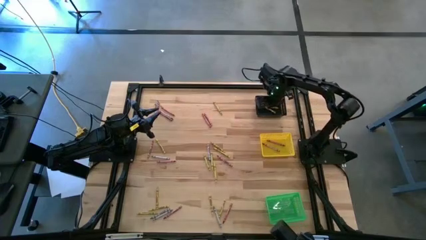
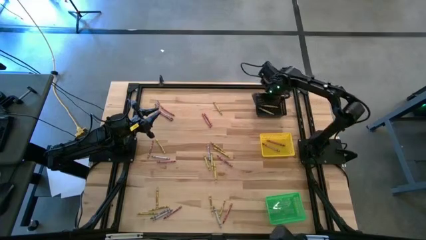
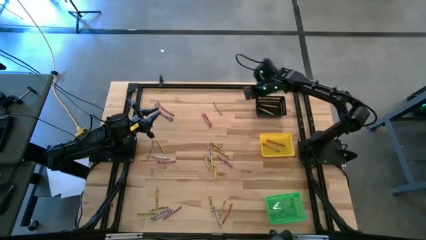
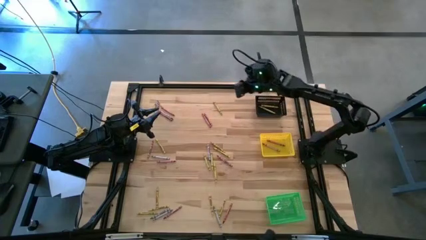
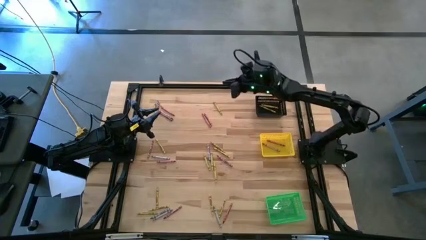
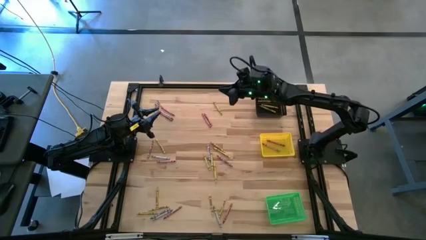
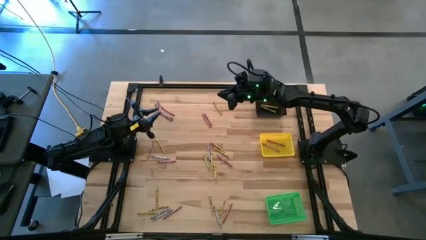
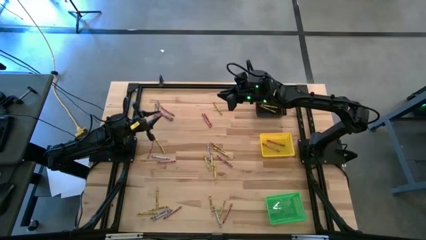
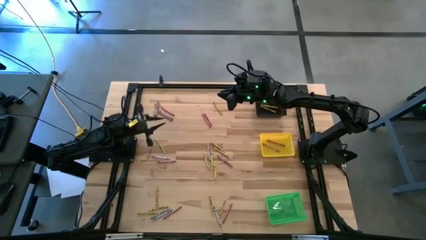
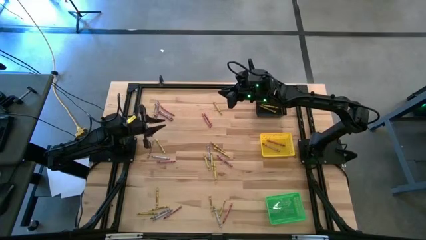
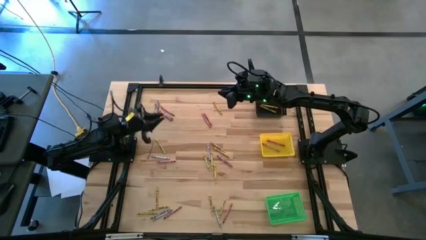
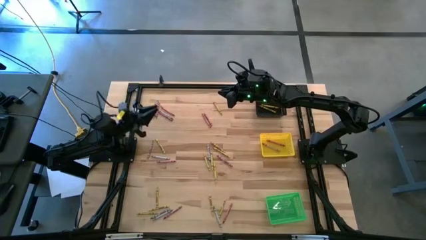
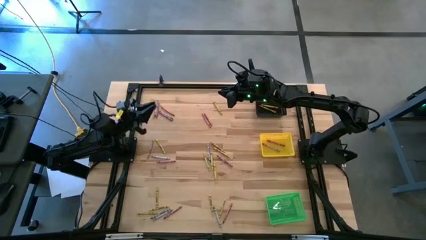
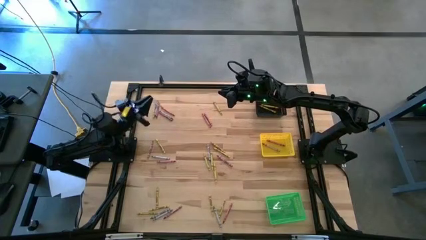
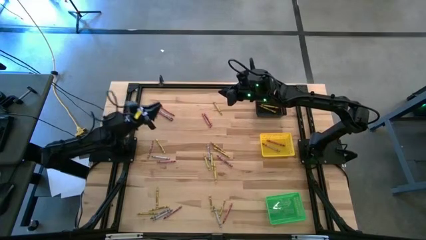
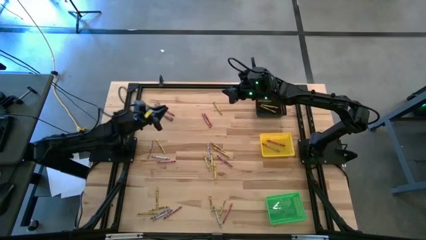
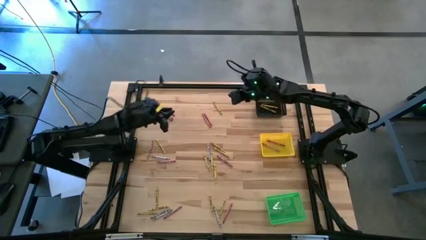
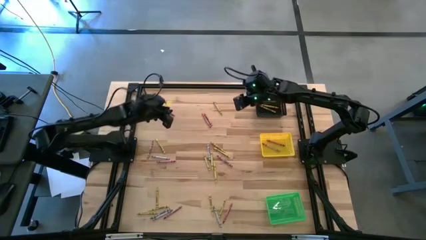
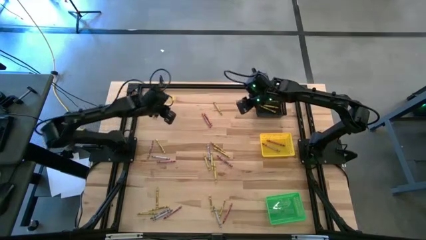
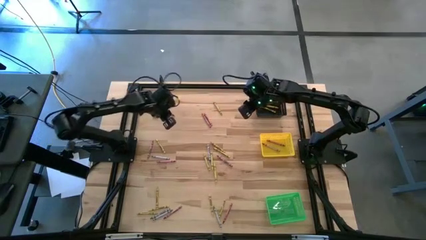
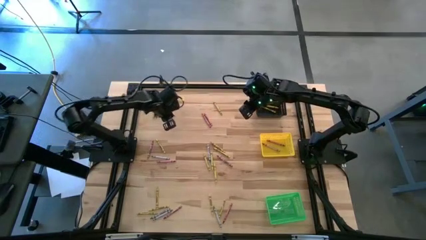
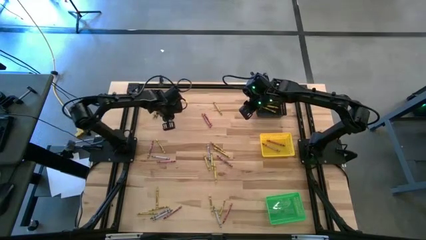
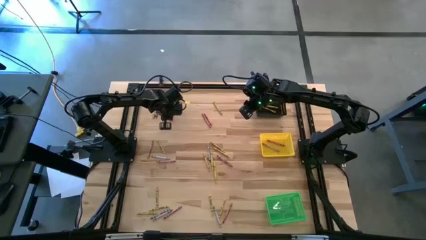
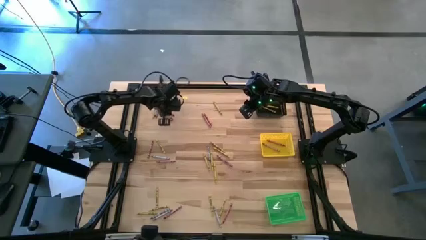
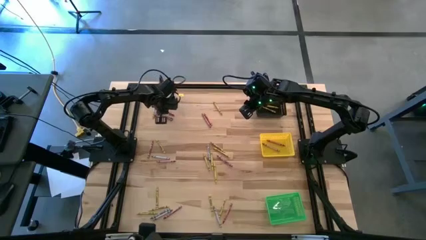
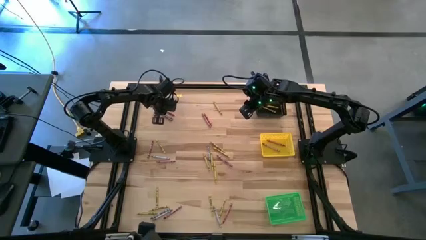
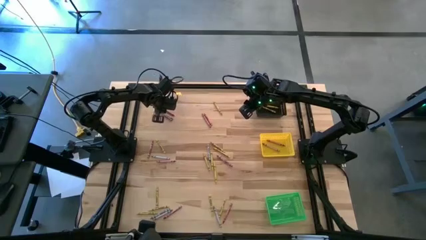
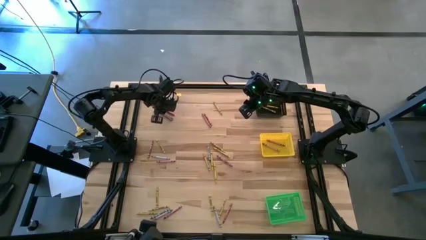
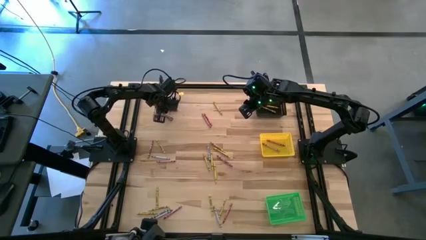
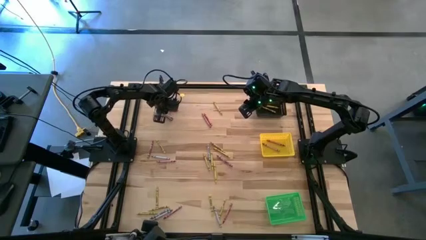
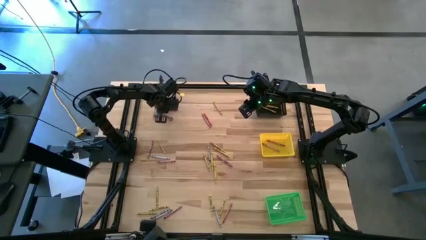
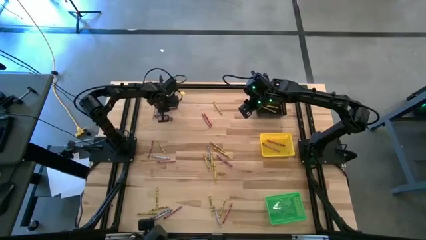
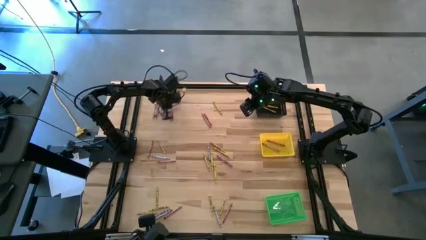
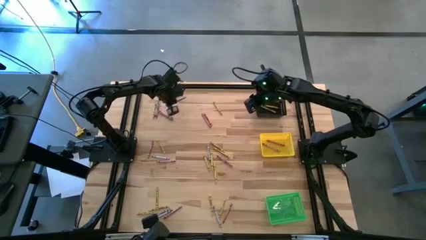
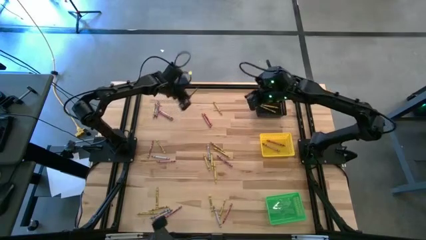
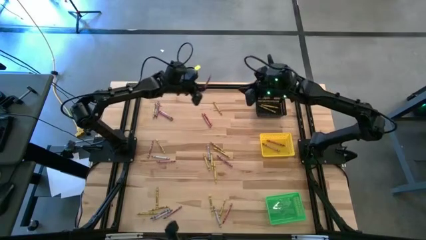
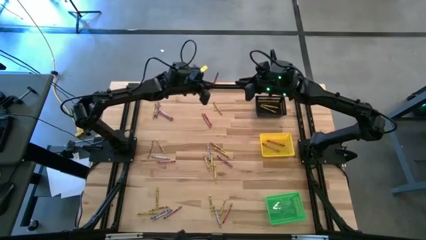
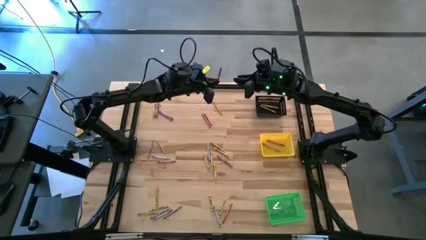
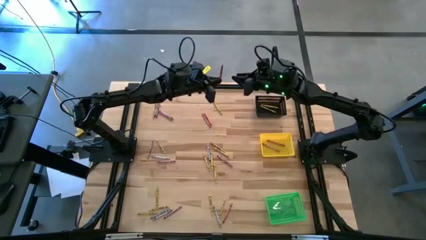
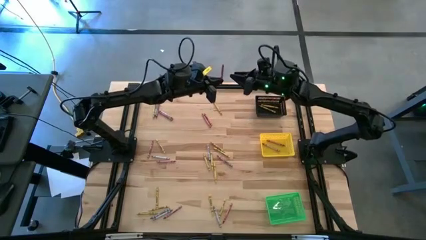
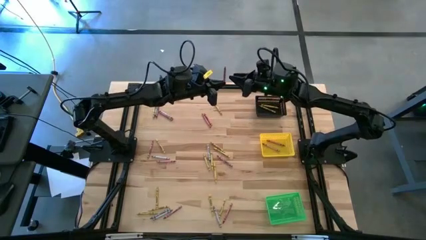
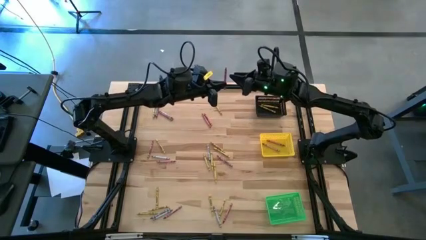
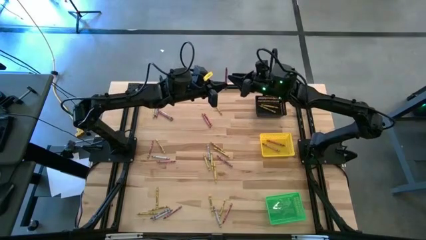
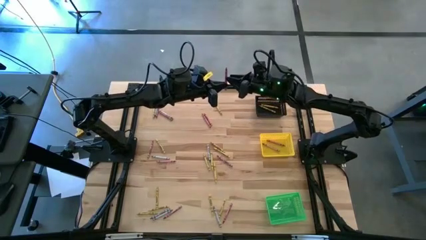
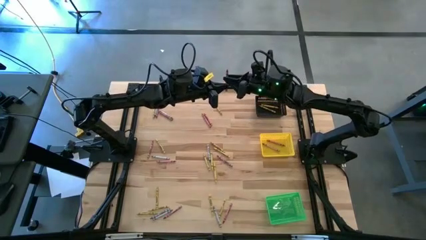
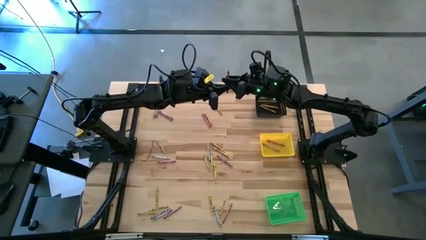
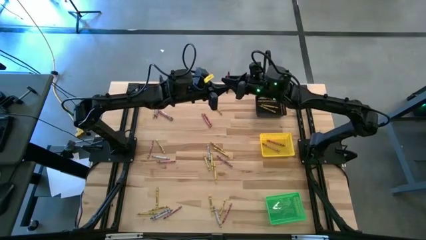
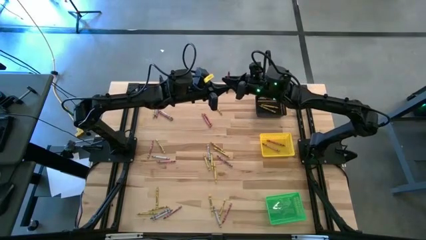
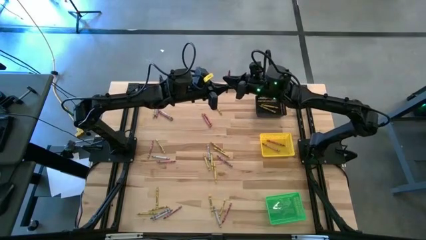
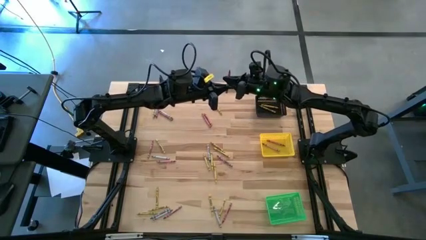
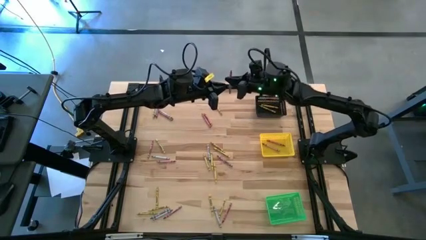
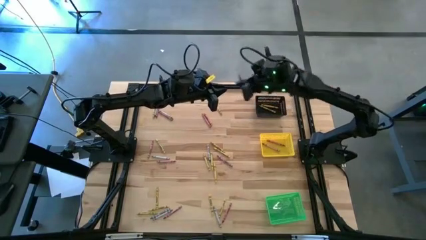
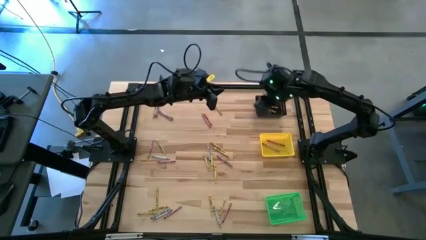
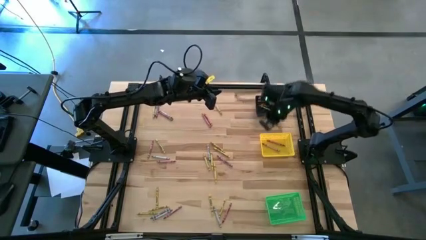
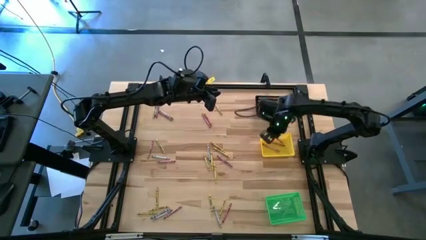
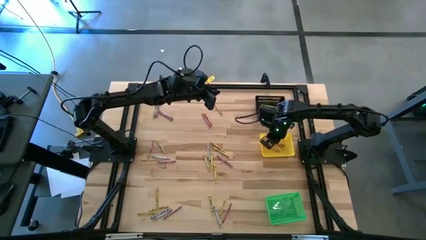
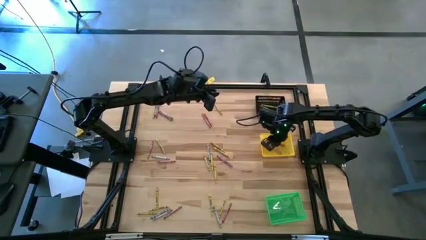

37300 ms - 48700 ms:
Task: Sort crayons
Put the red crayon into the yellow bin

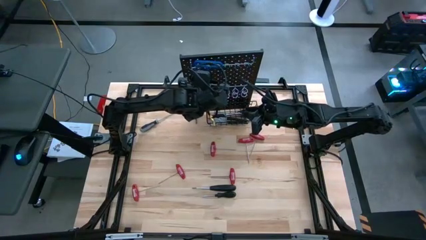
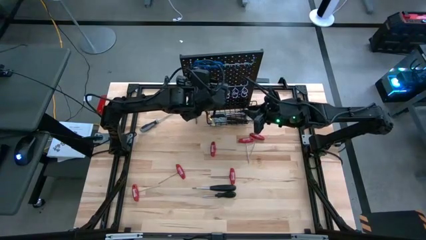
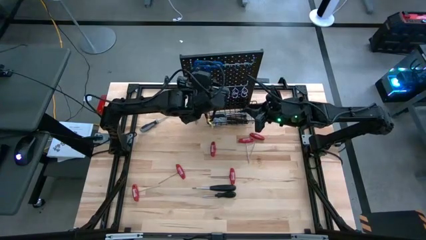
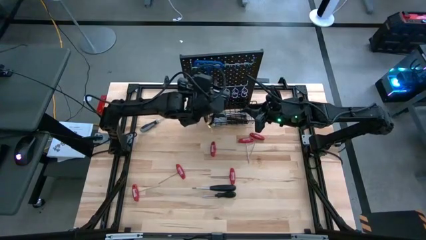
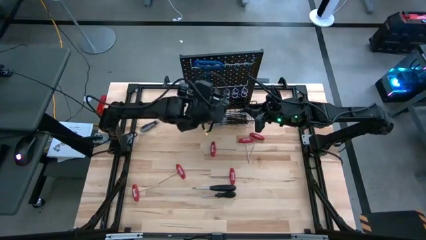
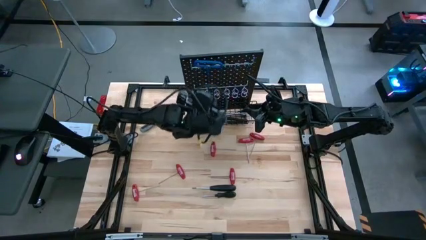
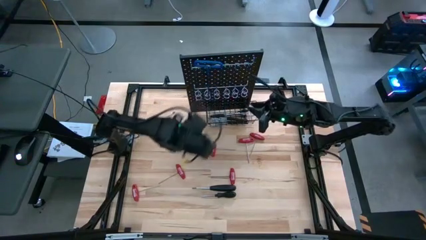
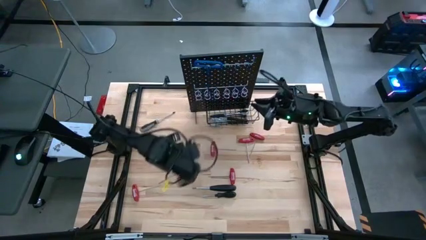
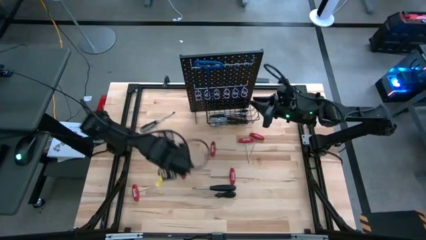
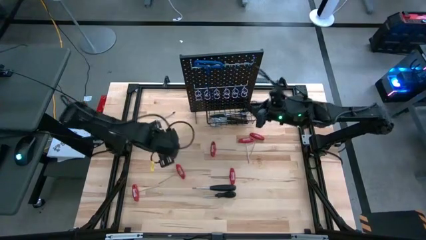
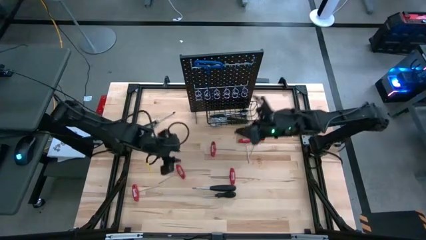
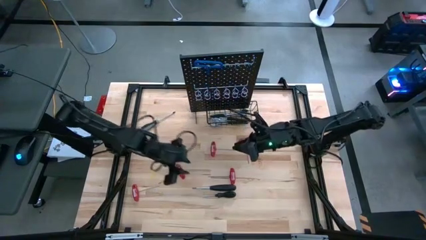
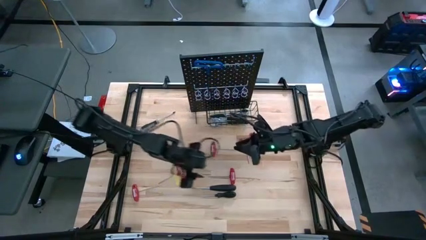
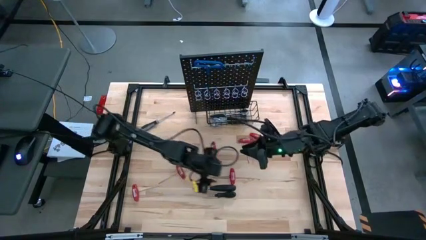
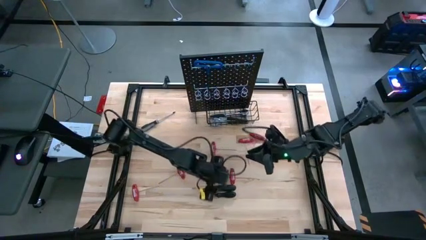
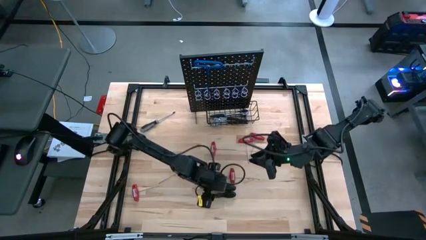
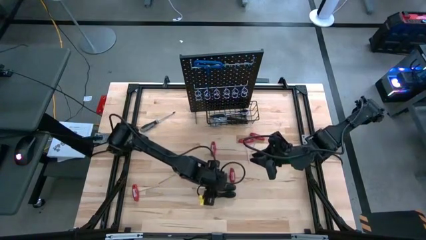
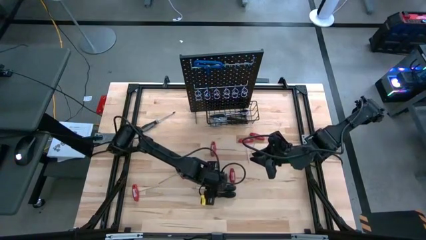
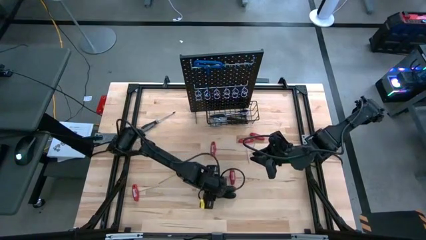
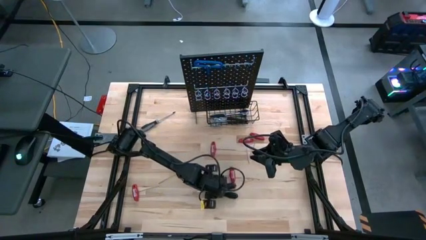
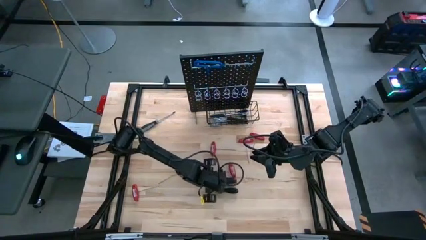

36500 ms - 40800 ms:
Task: Hang tools onto peg board
Hang the black screwdriver on the pegboard
